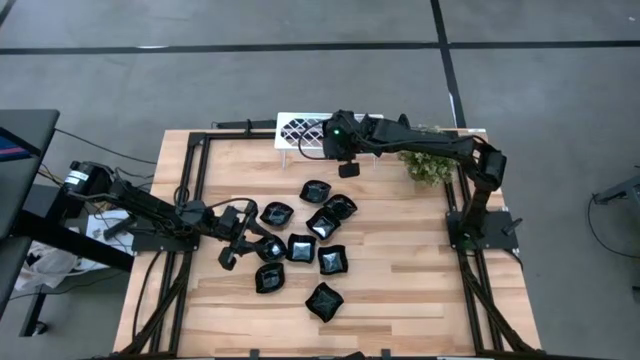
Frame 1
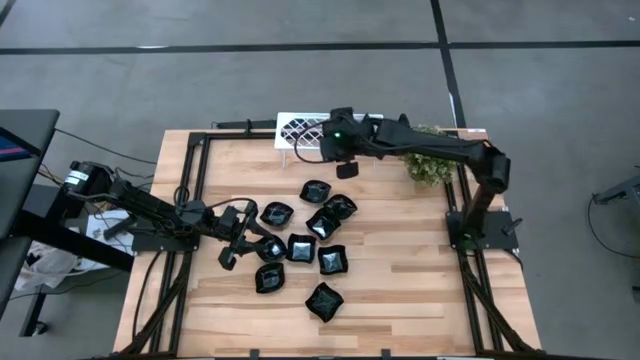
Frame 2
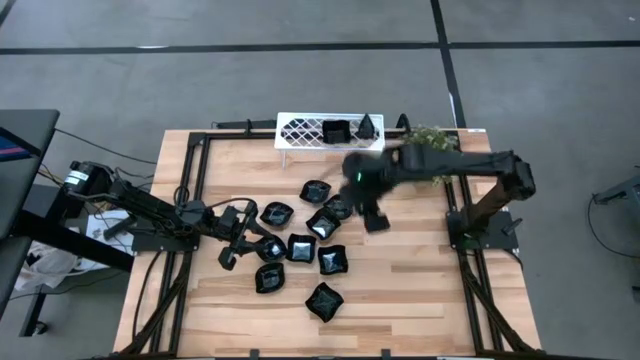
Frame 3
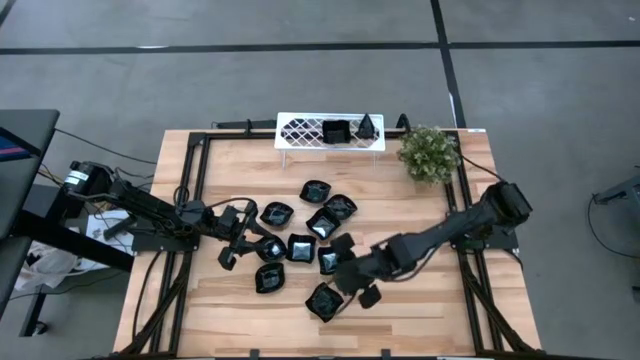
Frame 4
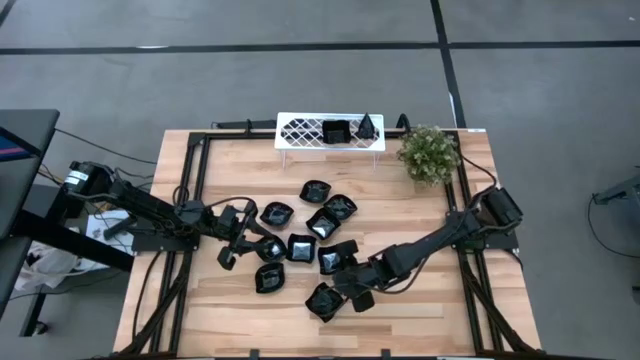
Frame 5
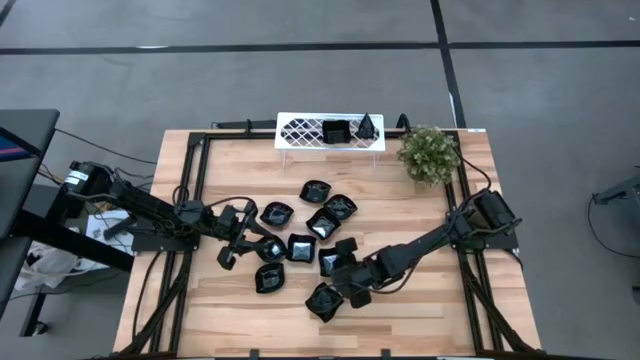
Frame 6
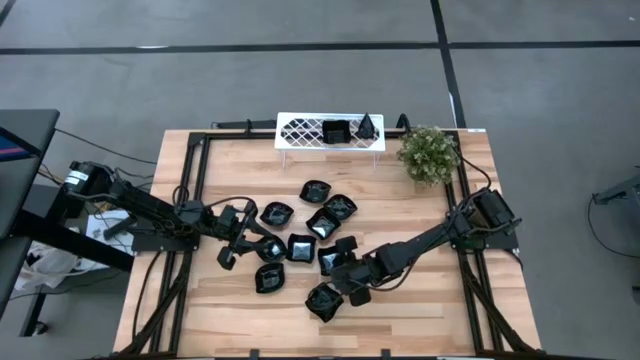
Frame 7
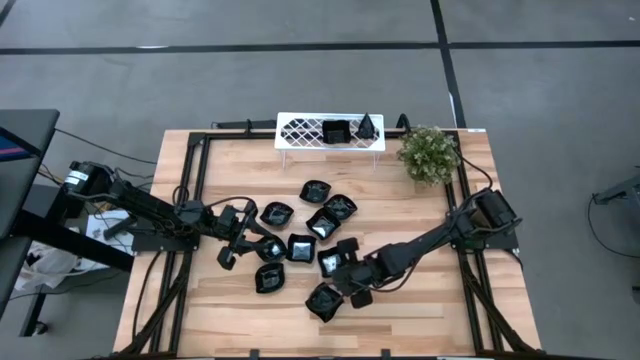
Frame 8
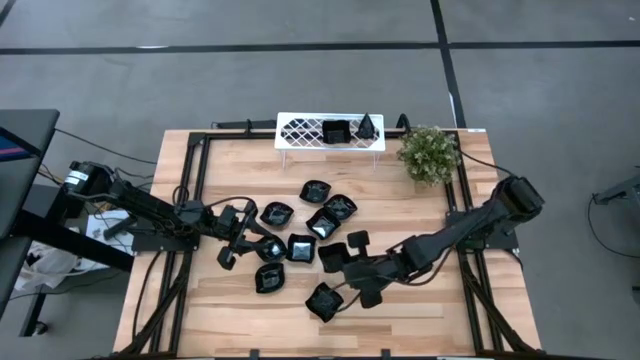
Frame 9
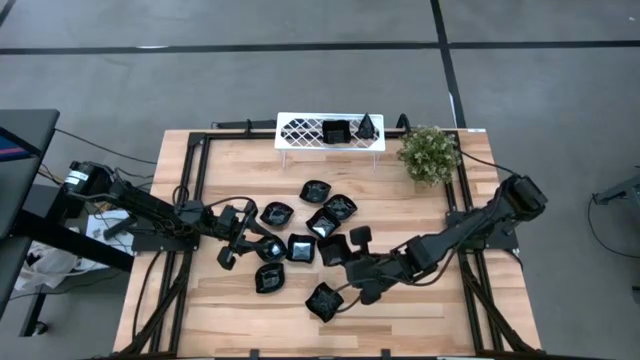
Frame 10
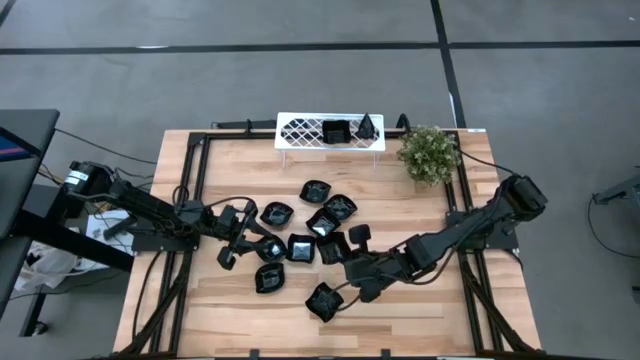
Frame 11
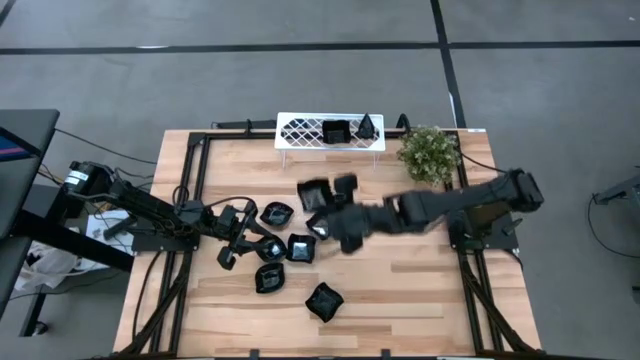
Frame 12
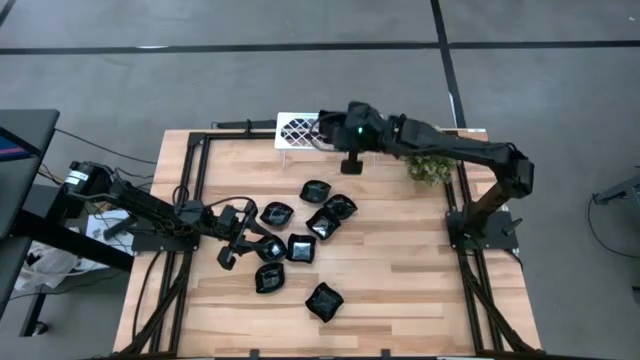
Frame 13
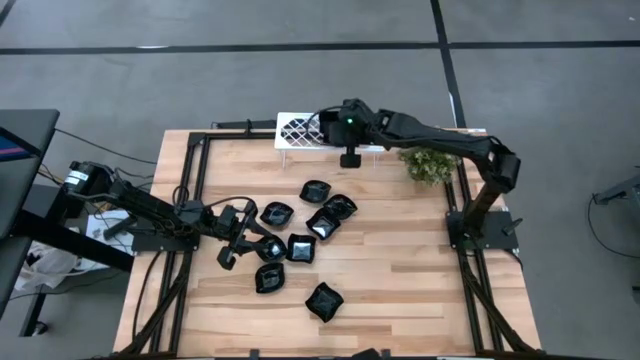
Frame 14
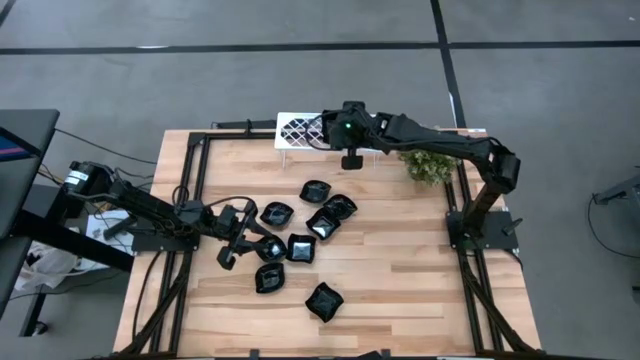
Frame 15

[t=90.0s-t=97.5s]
Task: Pick & Place Mini shaped plates
Stack the distorted square plate on top of the distorted square plate on the shelf

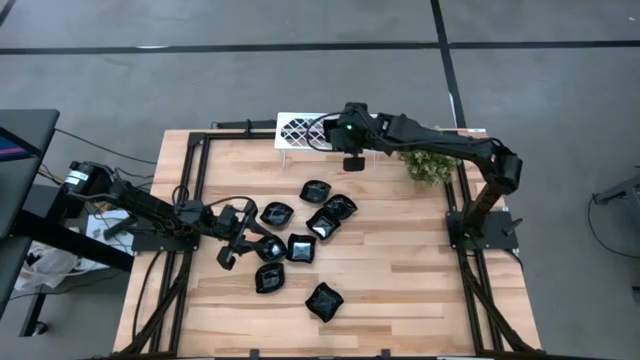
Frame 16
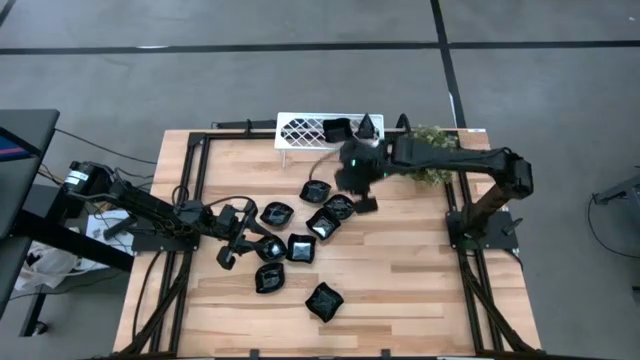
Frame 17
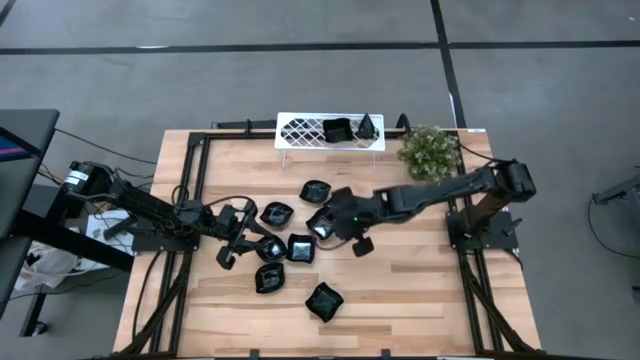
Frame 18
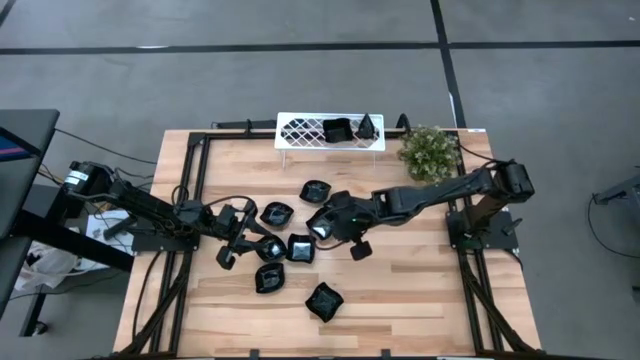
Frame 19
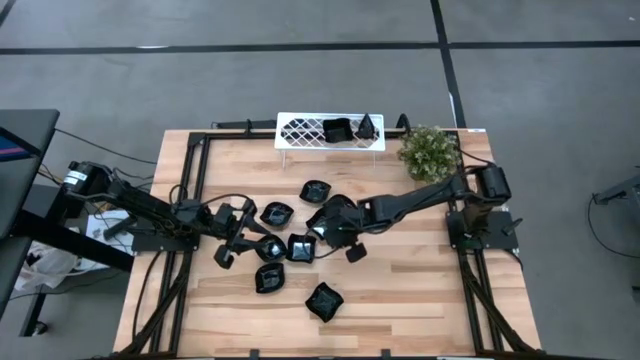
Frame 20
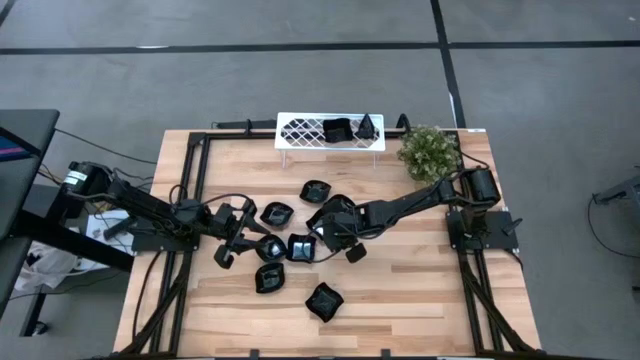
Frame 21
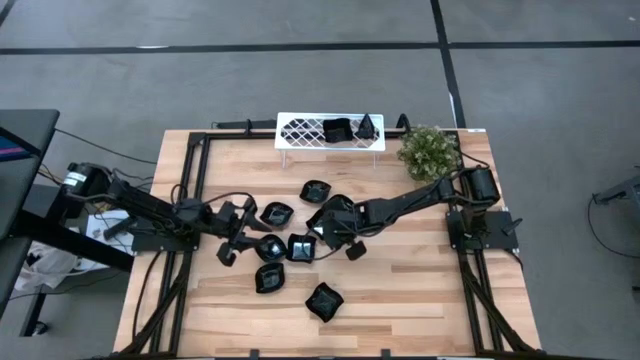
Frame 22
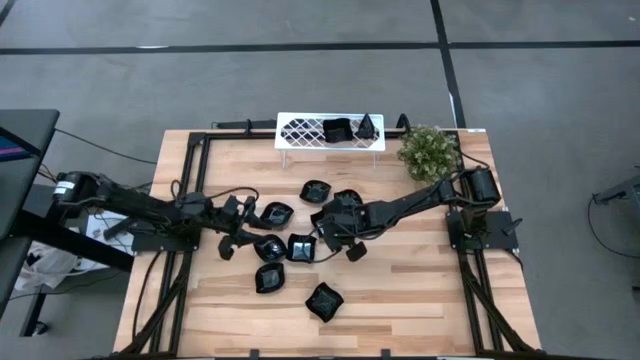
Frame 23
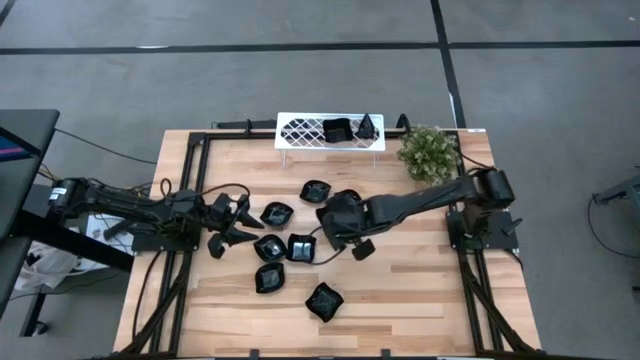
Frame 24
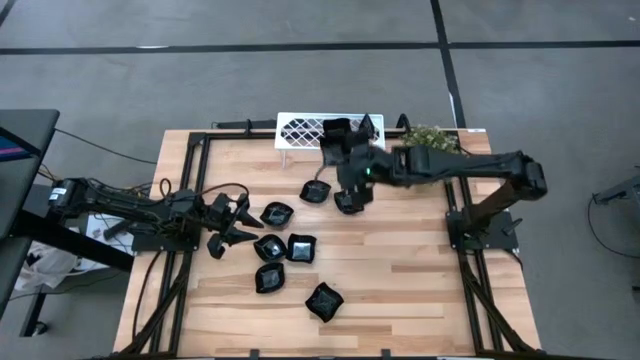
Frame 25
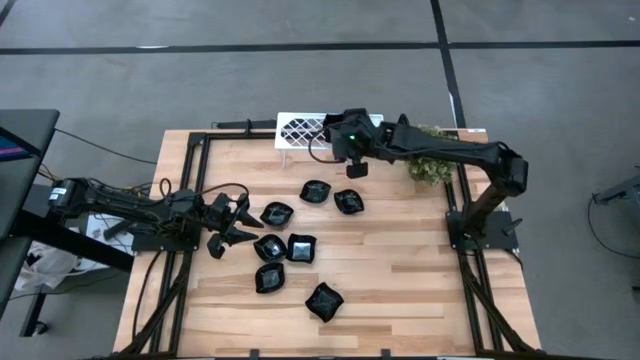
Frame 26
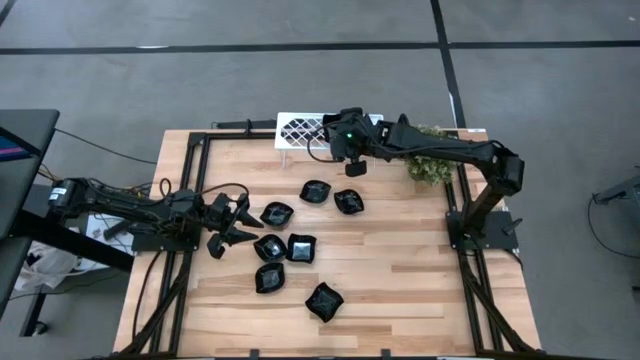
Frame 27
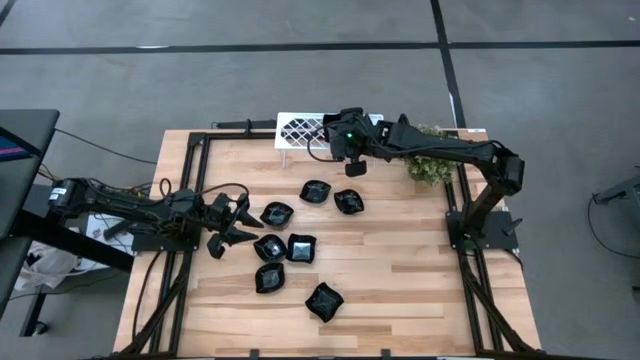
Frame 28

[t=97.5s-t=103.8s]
Stack the top distorted square plate on top of the distorted square plates on the shelf

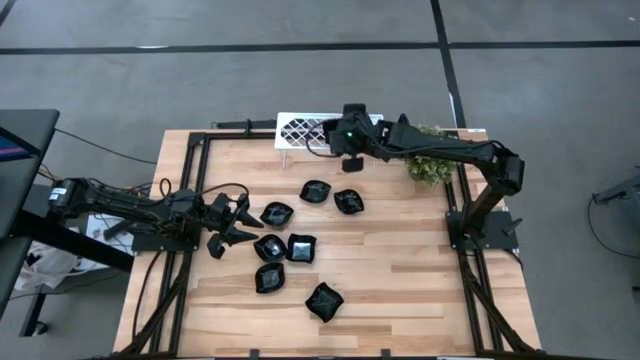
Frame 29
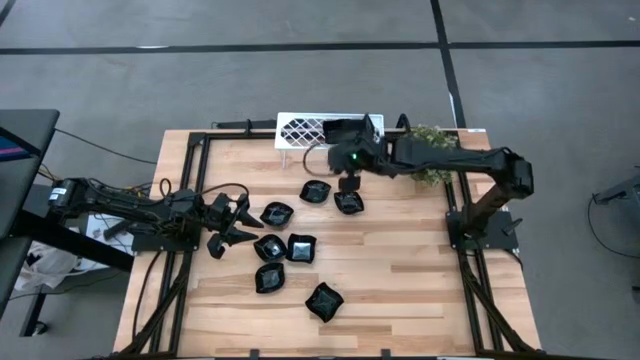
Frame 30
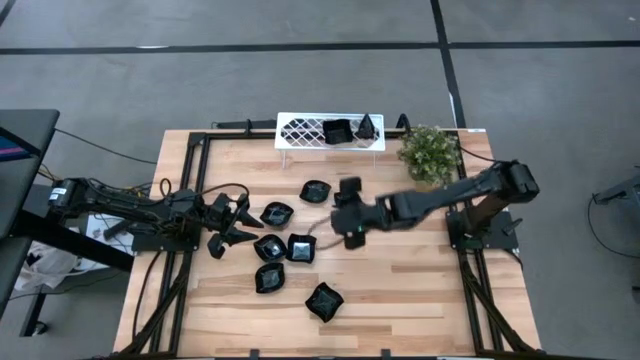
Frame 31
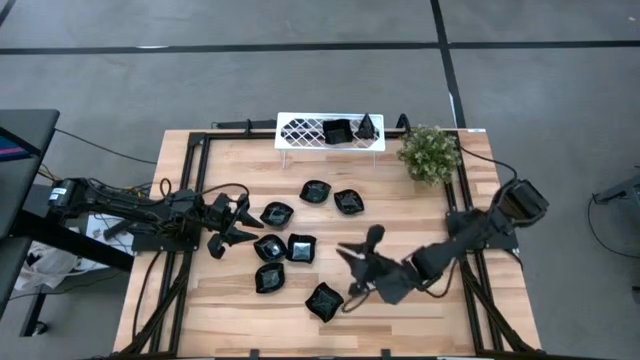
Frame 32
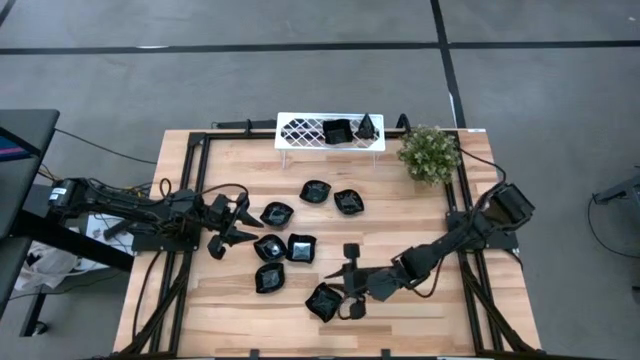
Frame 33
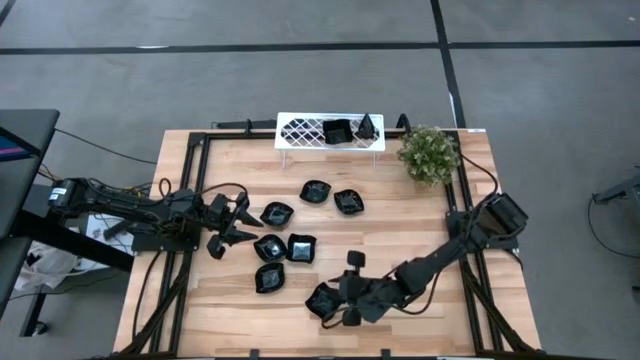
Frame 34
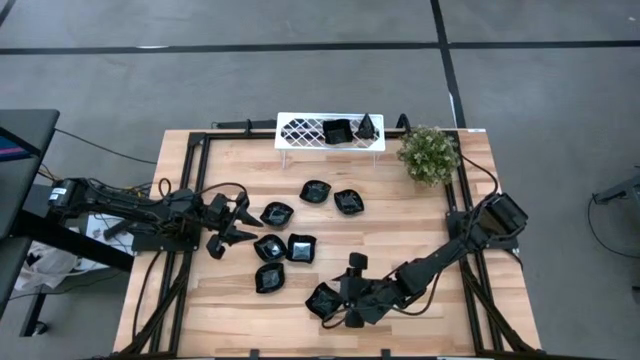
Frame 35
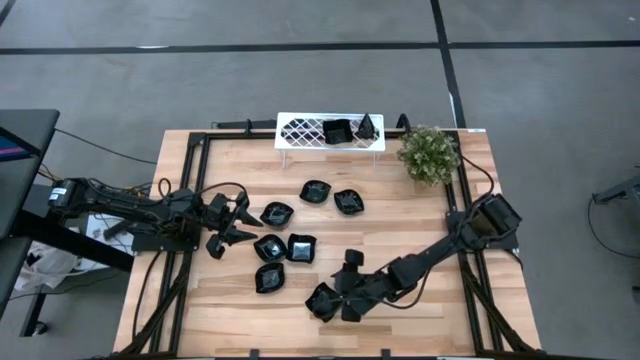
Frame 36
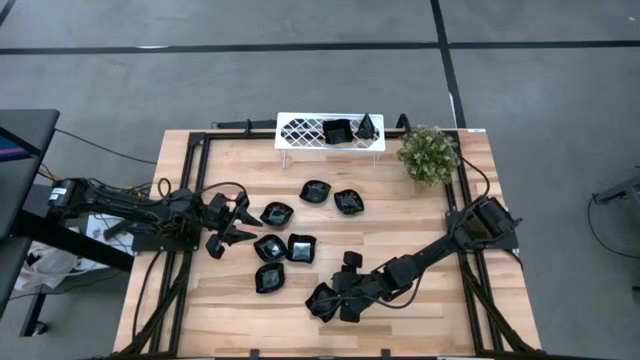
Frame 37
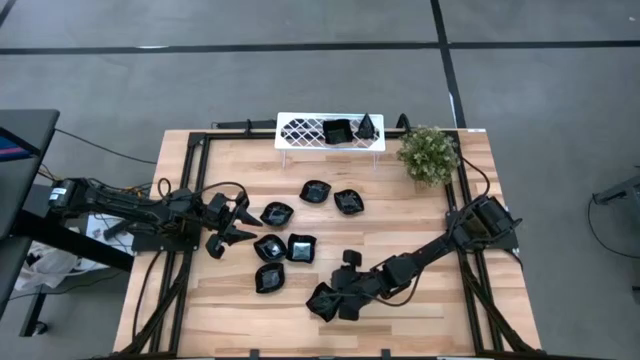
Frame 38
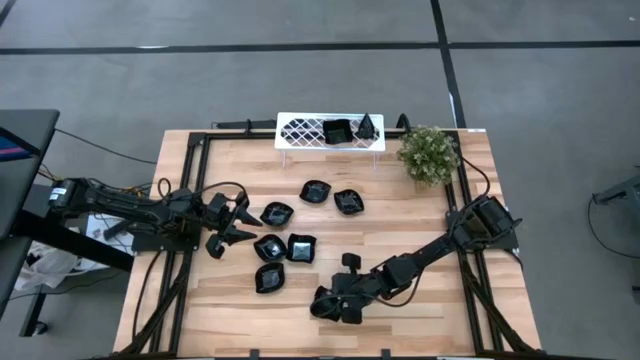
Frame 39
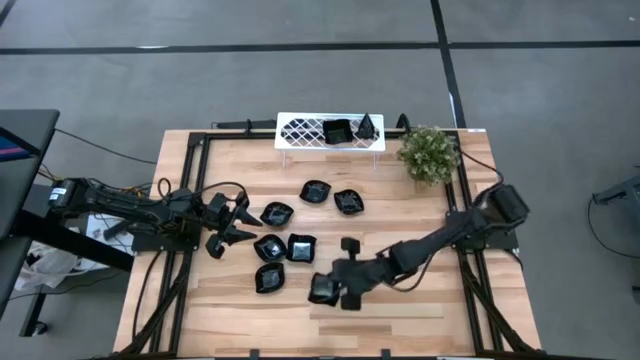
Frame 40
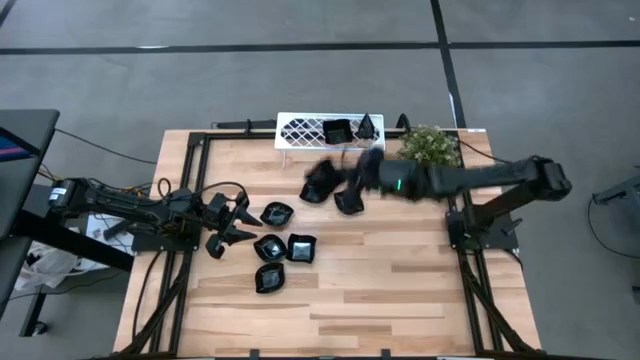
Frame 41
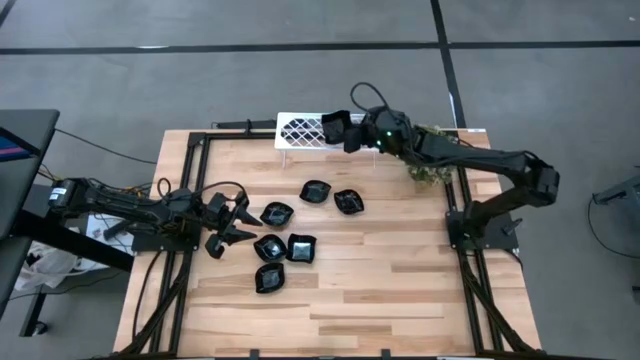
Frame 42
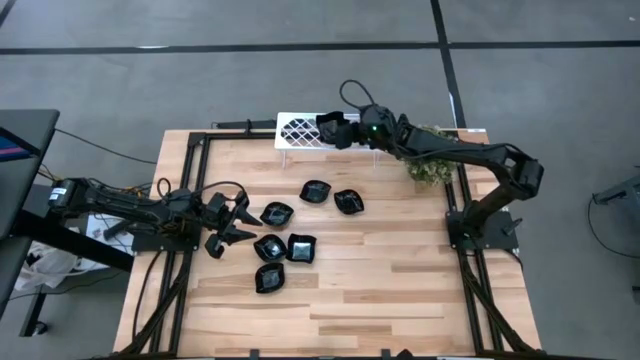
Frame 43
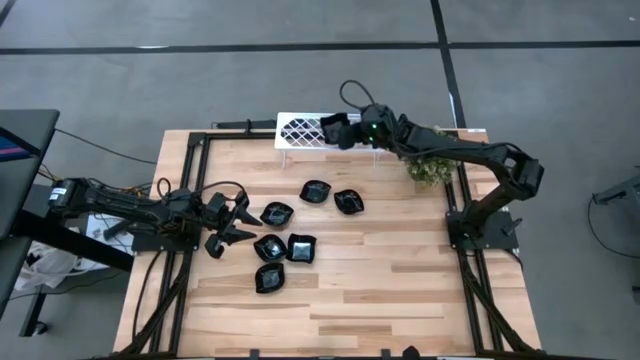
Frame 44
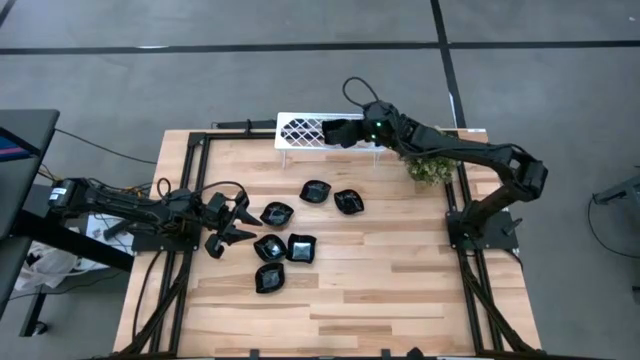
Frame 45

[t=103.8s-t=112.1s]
Stack the bottom distorted square plate on top of the distorted square plates on the shelf
